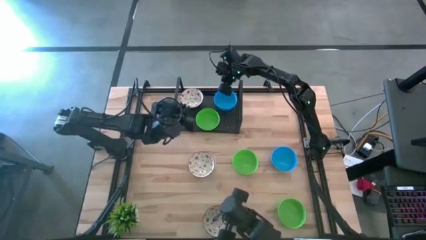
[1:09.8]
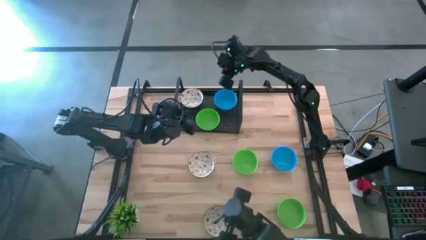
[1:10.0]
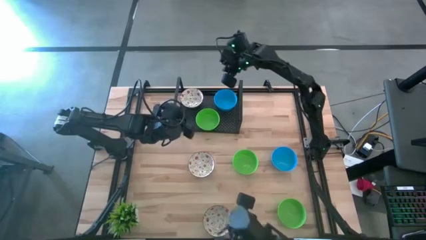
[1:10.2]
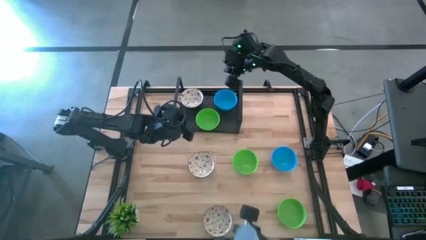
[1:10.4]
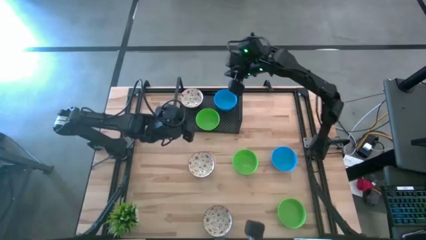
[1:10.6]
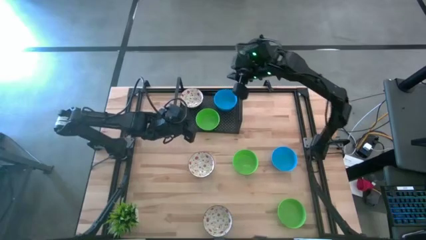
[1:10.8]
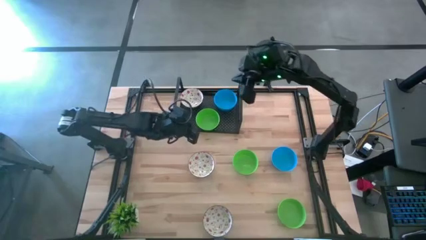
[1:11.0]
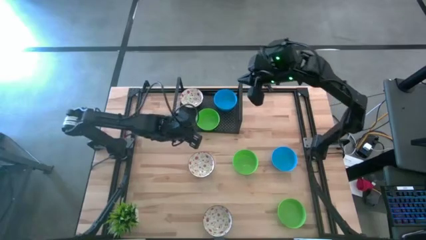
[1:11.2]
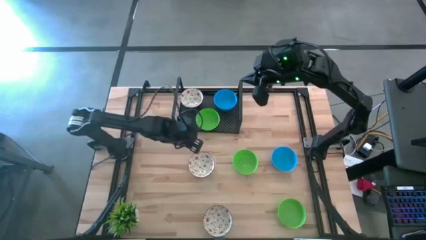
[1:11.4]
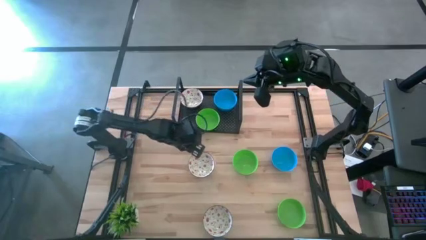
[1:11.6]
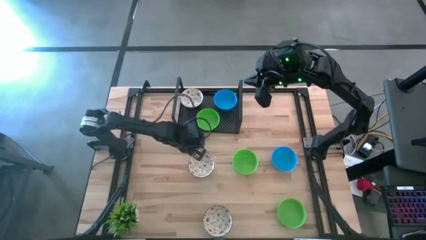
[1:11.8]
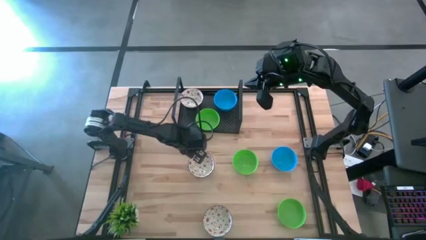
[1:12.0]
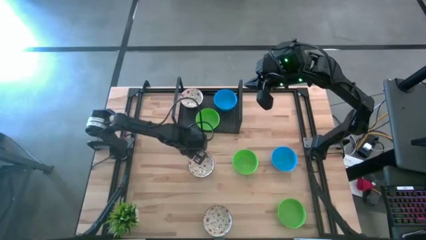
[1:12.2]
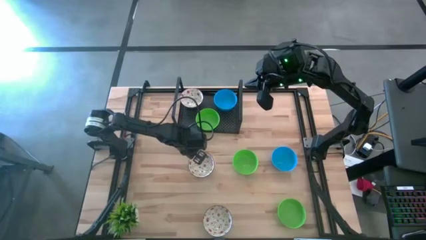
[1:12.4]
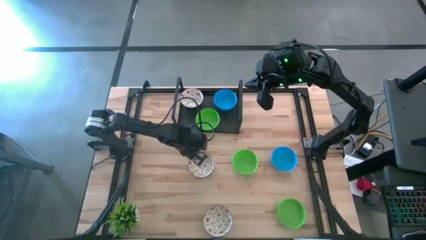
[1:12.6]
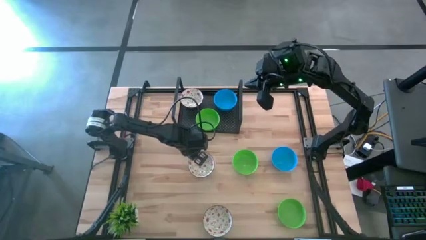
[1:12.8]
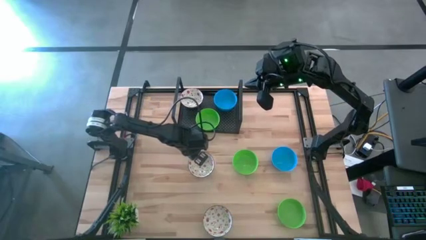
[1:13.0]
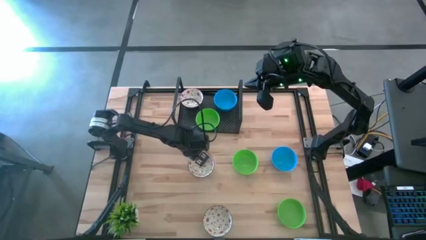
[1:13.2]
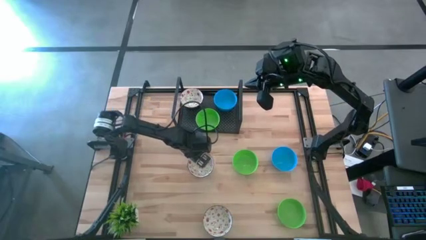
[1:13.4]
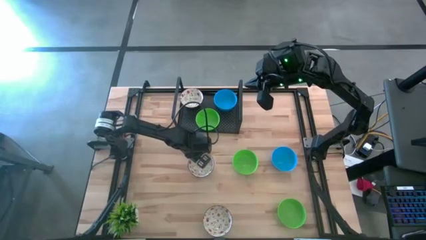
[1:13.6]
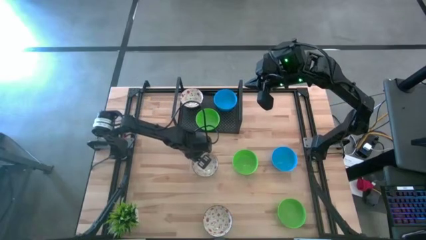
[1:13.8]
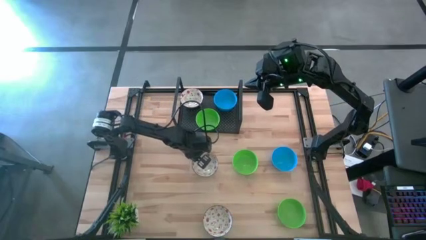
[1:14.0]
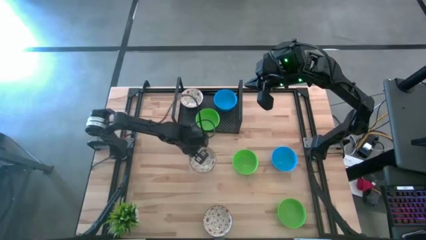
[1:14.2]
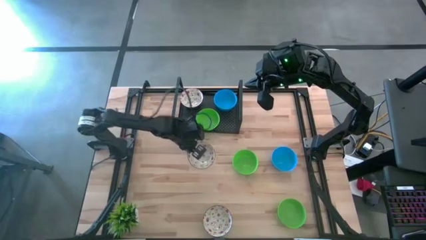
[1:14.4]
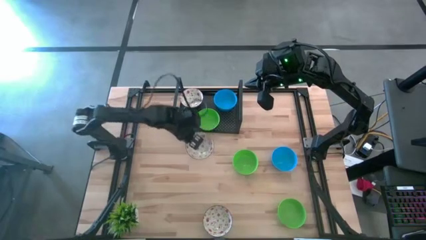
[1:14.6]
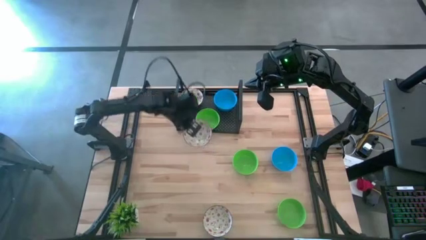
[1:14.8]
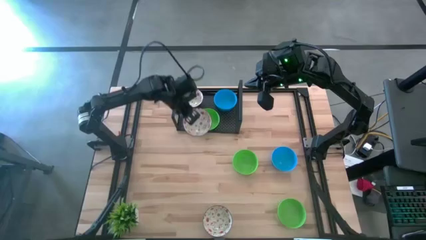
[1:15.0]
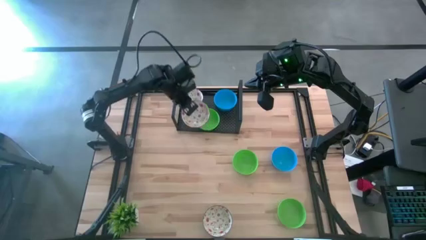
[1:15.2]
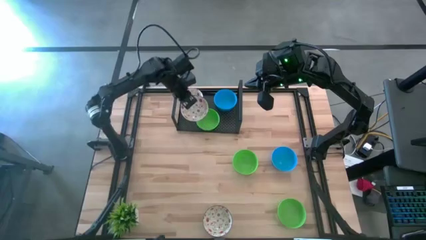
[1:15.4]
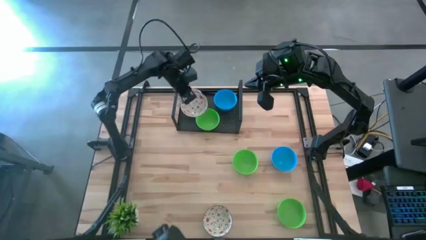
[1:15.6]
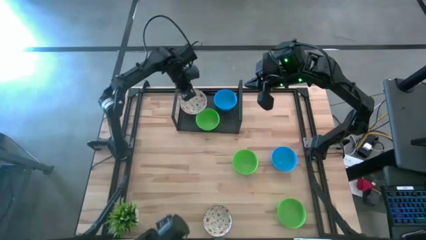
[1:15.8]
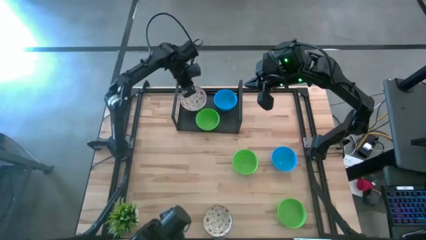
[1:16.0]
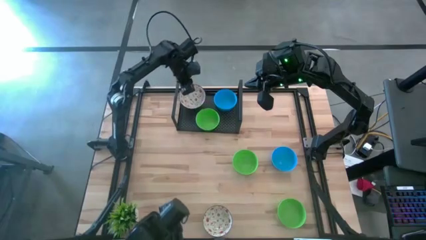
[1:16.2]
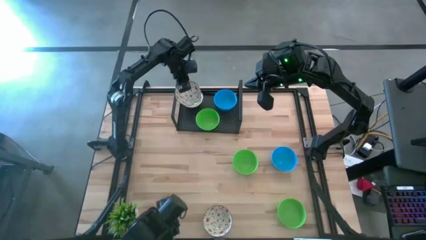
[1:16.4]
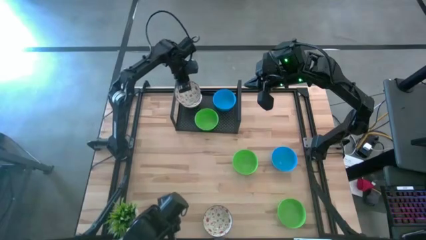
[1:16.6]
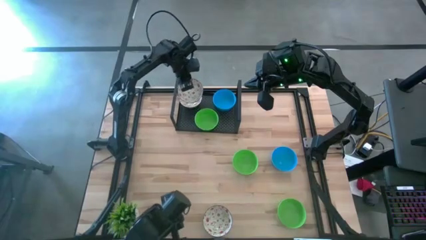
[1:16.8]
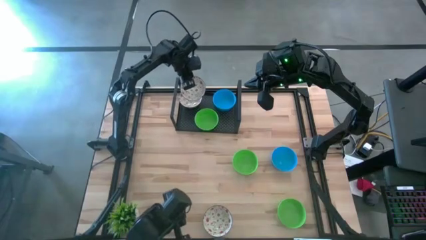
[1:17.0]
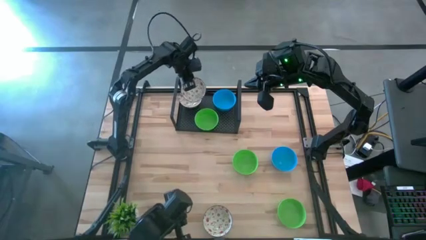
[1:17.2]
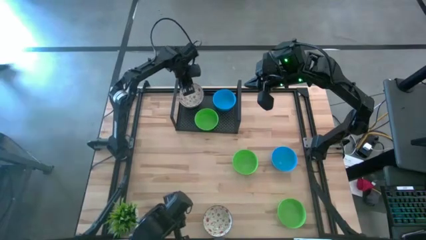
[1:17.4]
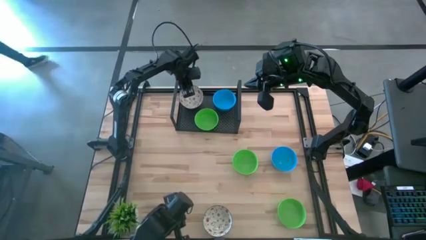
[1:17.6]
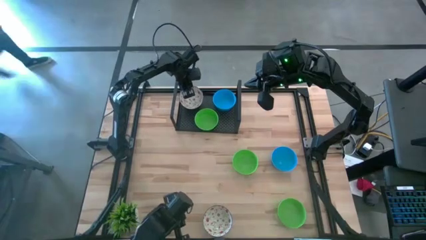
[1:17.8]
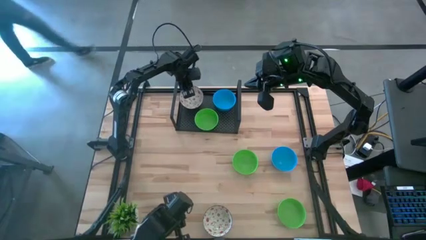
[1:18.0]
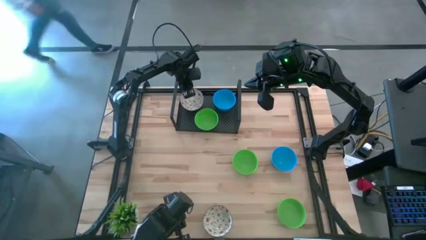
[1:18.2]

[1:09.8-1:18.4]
Task: Pick & Place Mini bowls
Stack the top white bowl on top of the white bowl on the shelf

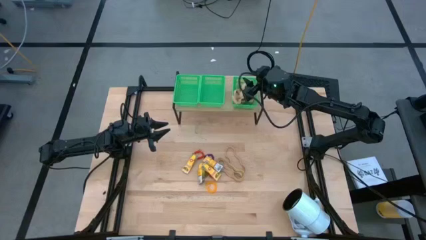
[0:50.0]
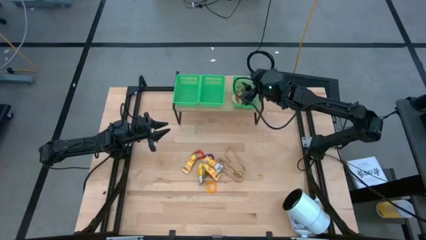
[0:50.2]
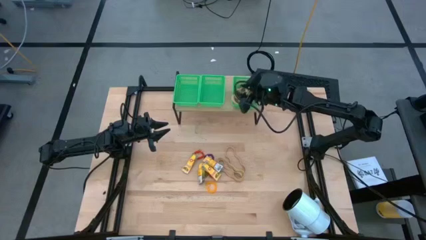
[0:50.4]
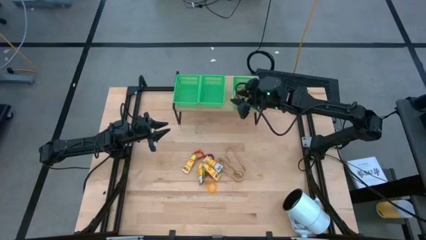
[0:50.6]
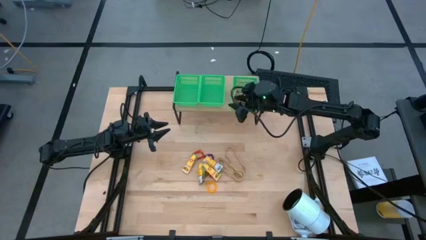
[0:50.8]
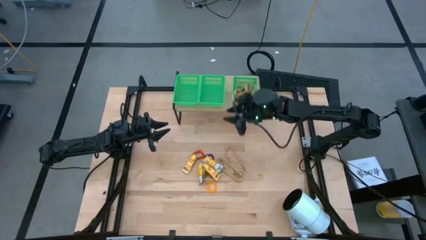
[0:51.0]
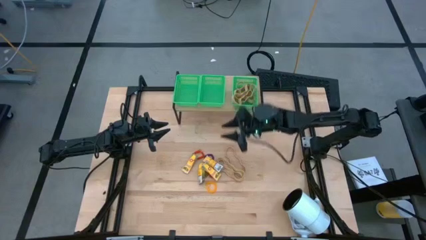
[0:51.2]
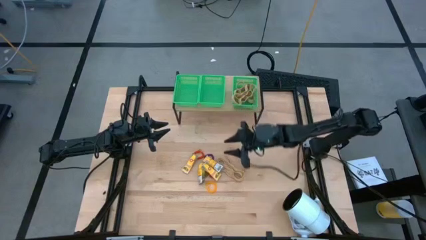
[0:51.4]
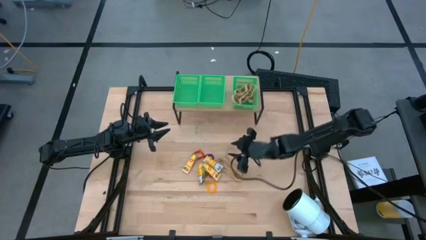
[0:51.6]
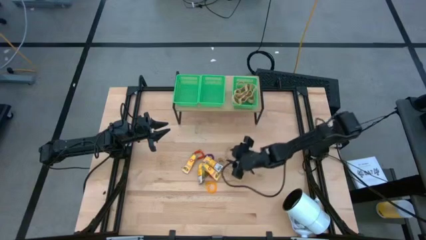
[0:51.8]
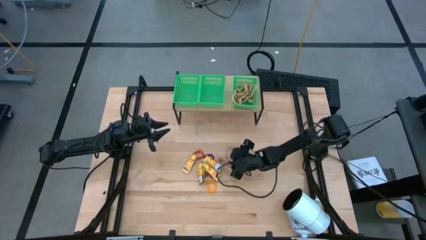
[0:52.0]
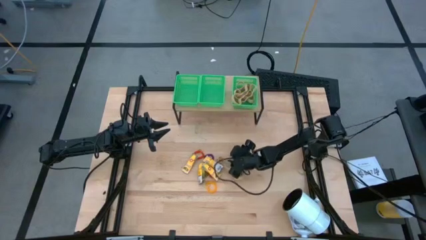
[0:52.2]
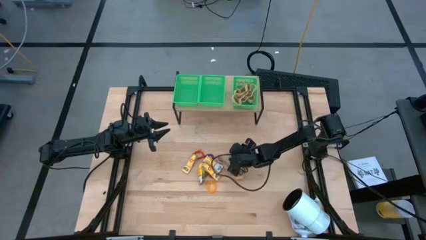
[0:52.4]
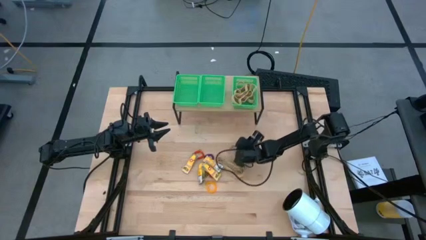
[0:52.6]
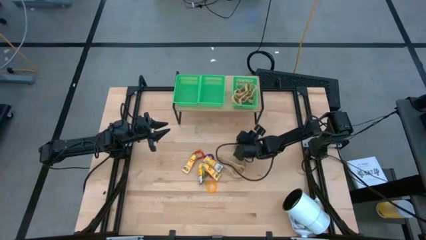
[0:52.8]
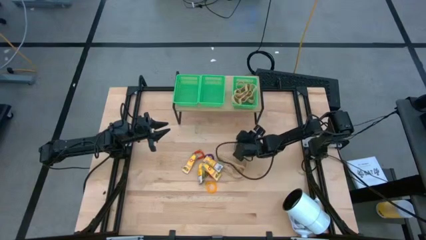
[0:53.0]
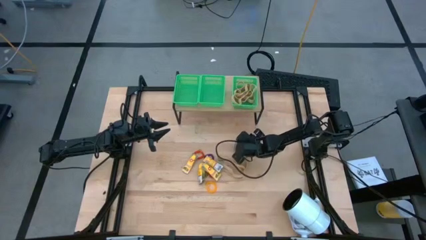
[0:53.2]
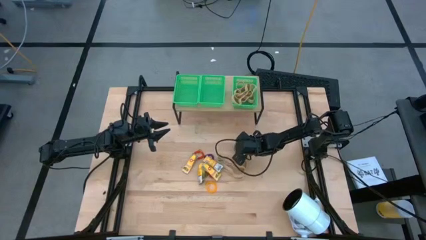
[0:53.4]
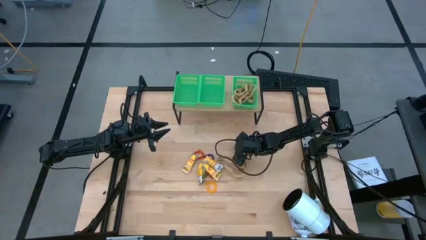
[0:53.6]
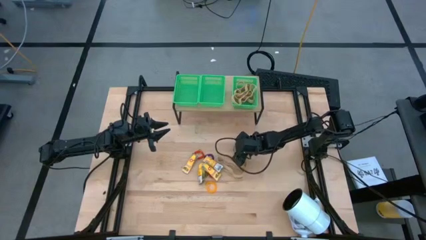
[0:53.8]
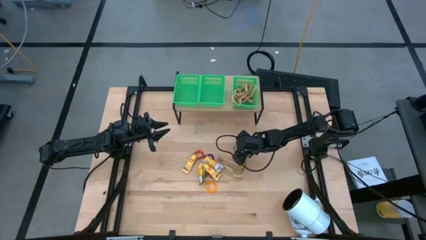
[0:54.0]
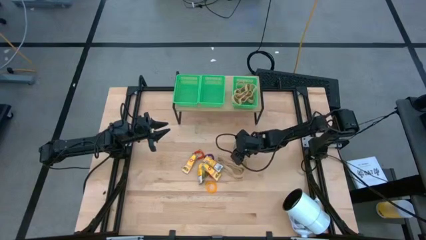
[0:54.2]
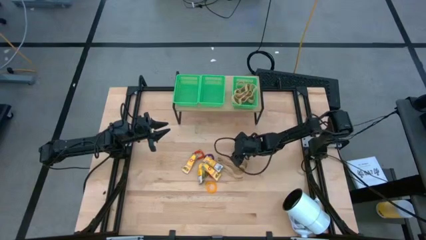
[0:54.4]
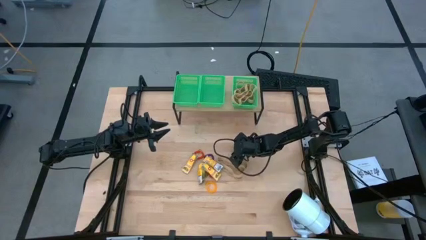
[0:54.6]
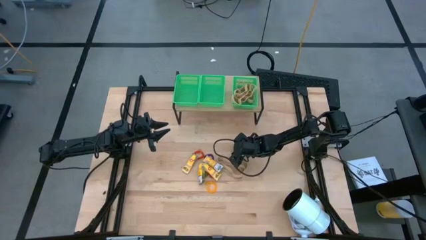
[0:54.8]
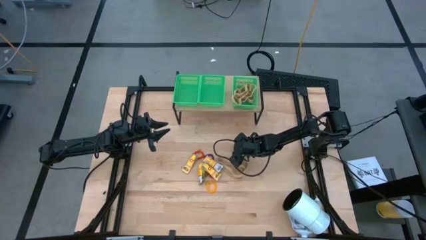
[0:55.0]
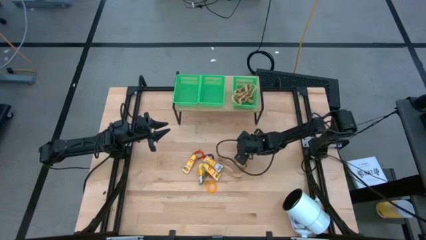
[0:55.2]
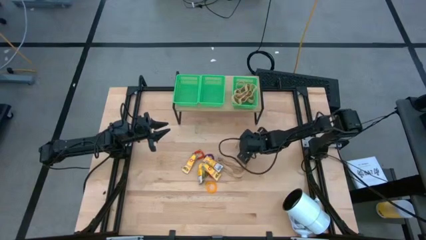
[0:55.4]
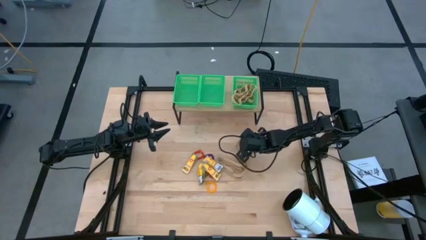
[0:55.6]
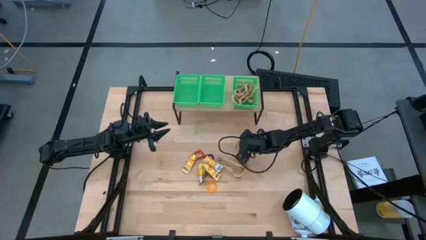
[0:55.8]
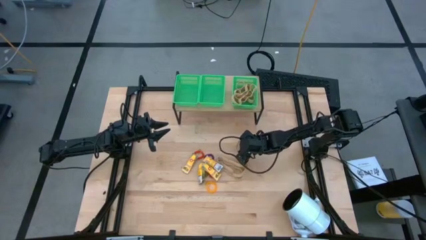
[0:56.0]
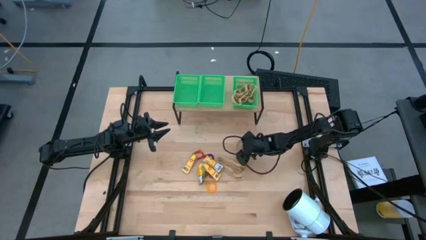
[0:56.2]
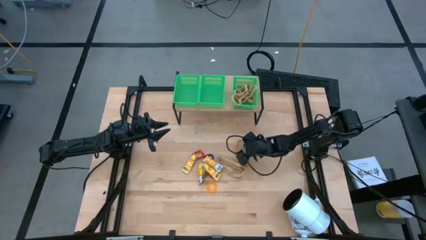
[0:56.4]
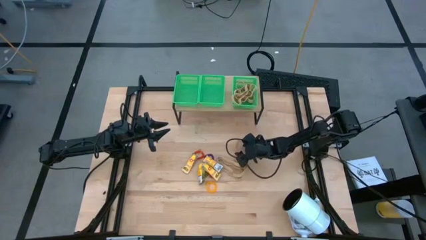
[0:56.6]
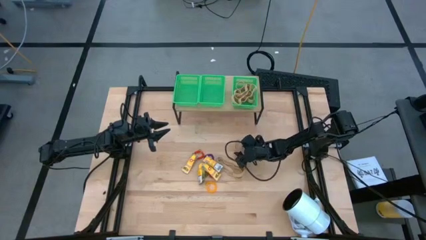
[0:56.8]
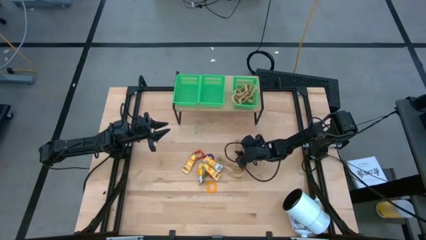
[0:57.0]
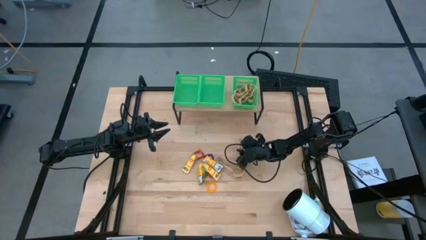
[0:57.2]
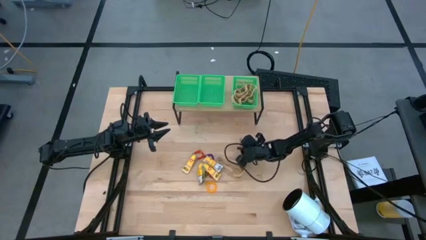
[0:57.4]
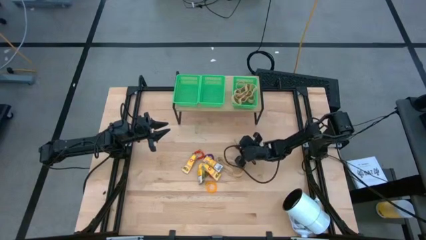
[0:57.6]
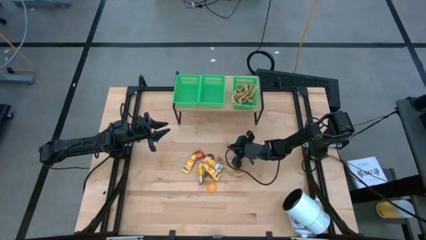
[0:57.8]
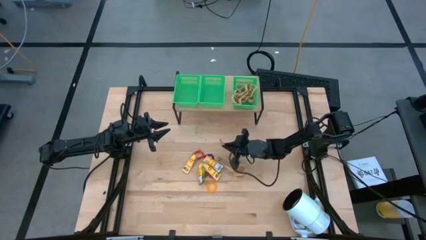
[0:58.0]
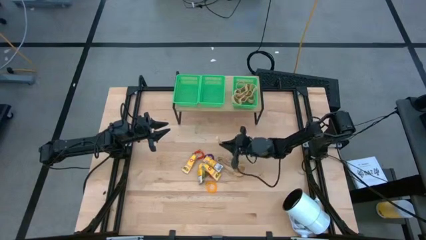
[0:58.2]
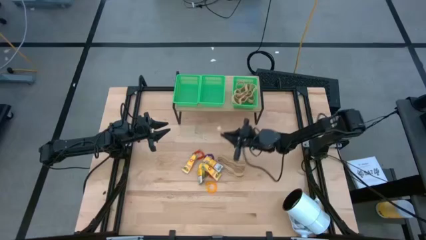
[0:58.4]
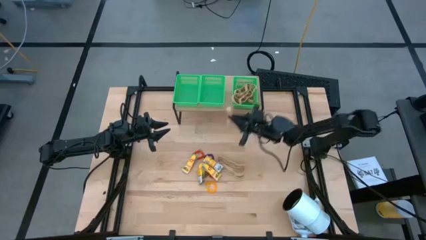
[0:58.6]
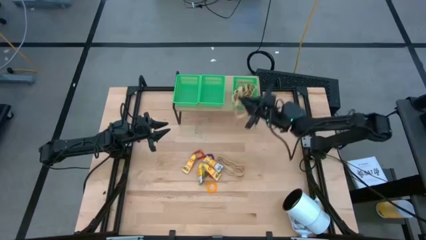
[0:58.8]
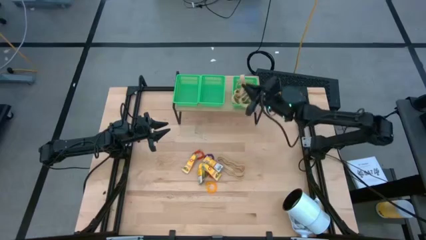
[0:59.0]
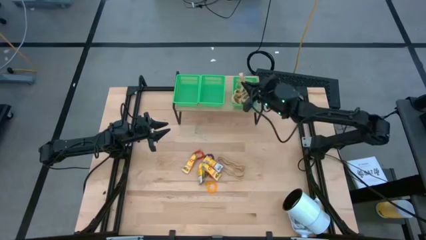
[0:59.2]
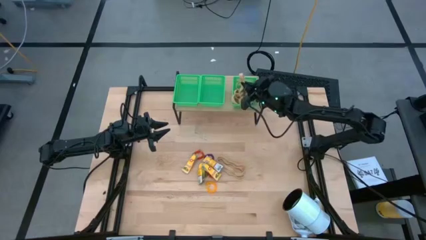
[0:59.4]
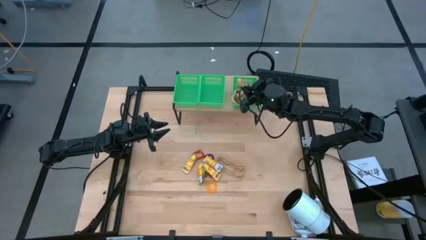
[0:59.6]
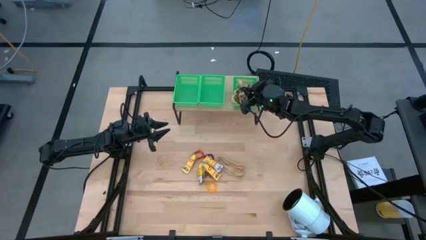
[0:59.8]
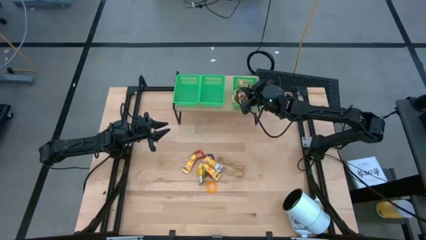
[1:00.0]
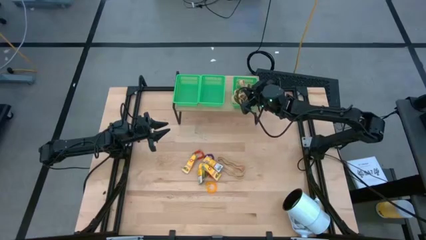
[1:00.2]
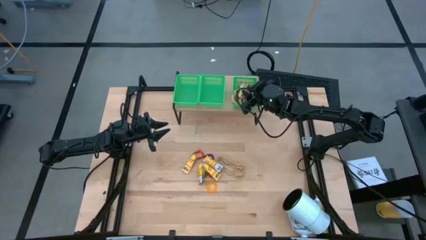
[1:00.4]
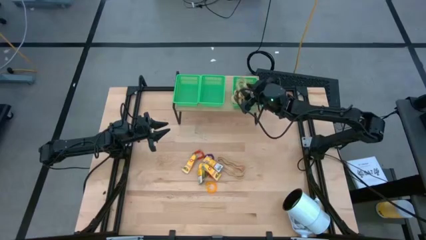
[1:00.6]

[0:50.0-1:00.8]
Task: Pick & Place Office Desk Supplies
Put the brown rubber band into the right green bin on the shelf
